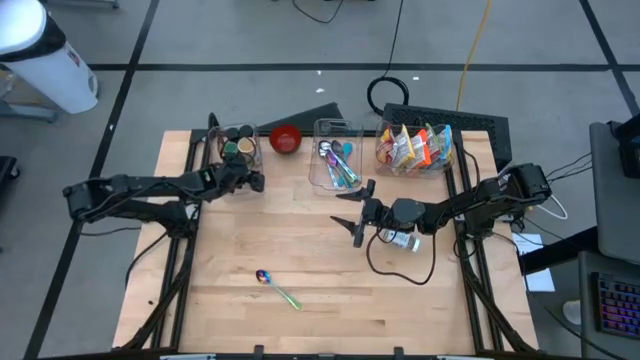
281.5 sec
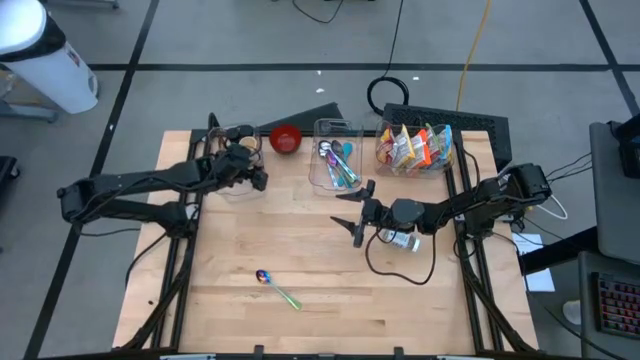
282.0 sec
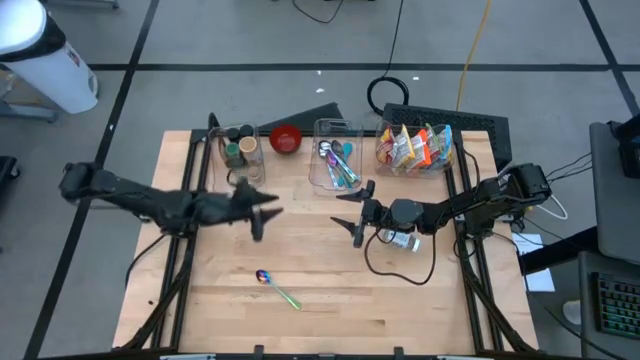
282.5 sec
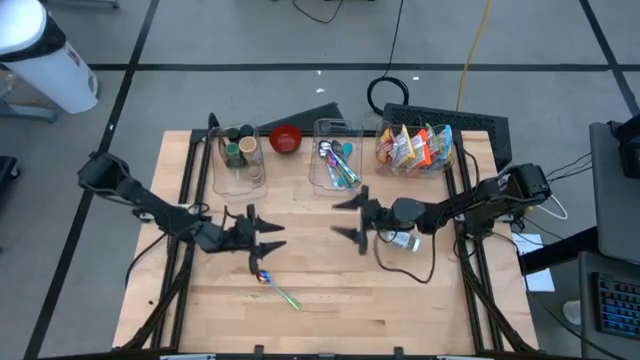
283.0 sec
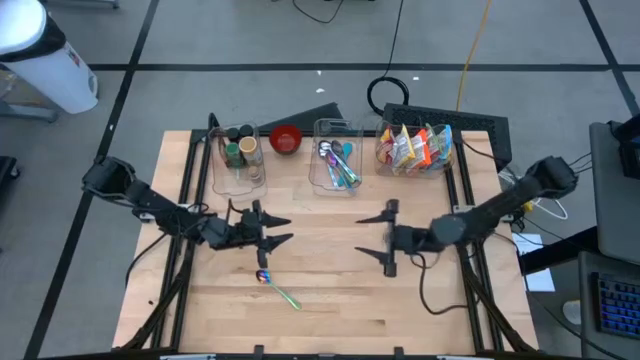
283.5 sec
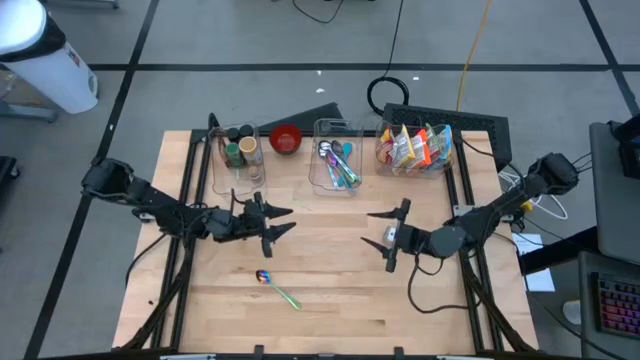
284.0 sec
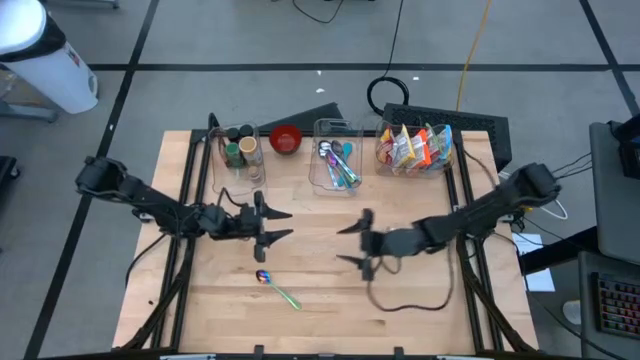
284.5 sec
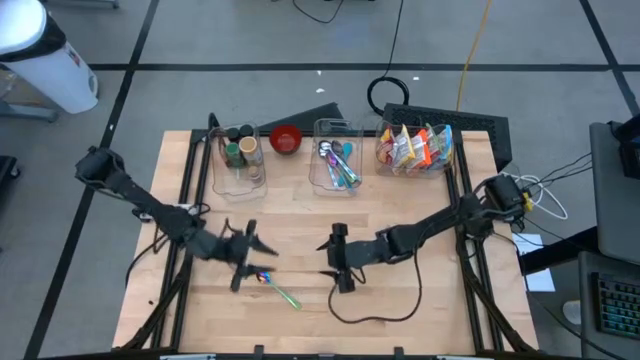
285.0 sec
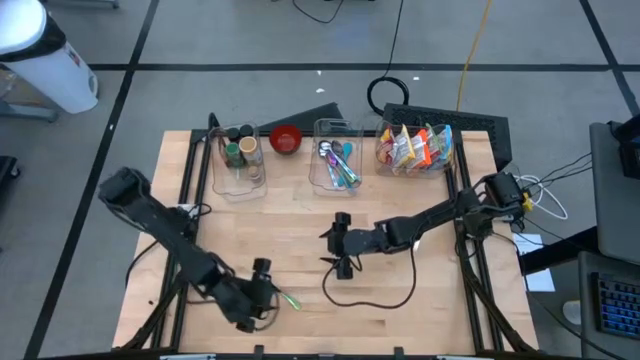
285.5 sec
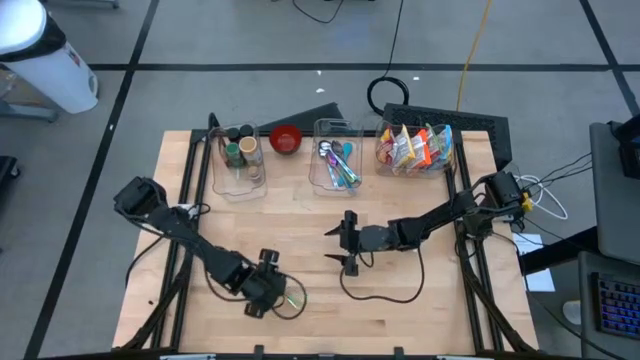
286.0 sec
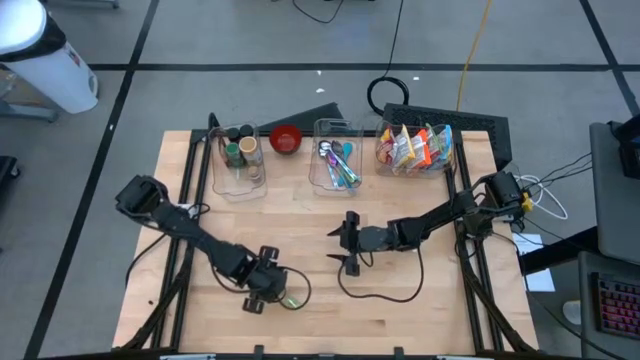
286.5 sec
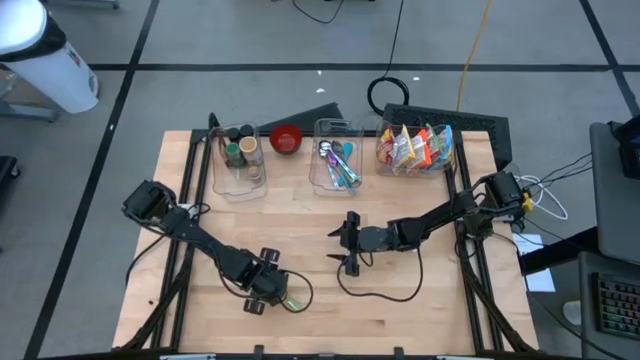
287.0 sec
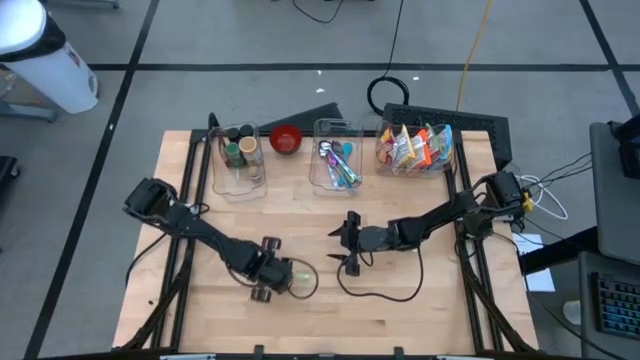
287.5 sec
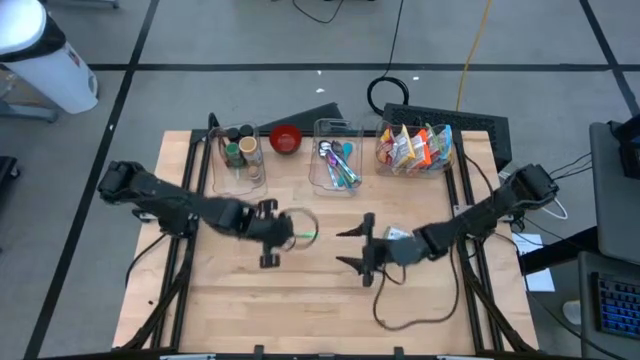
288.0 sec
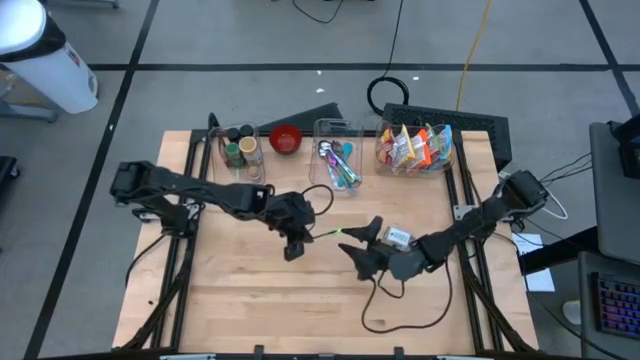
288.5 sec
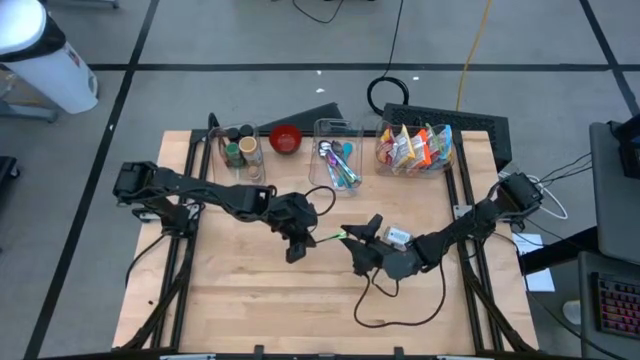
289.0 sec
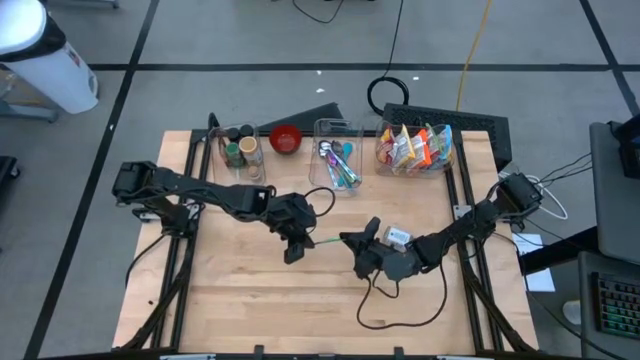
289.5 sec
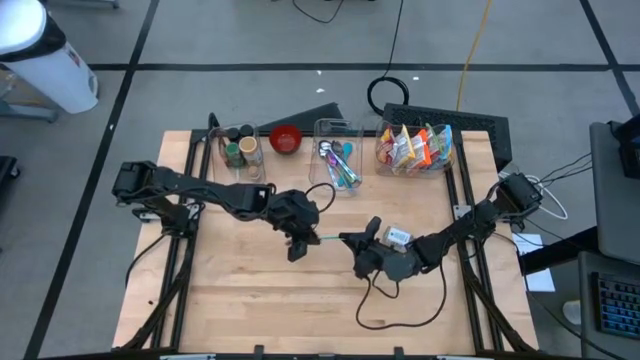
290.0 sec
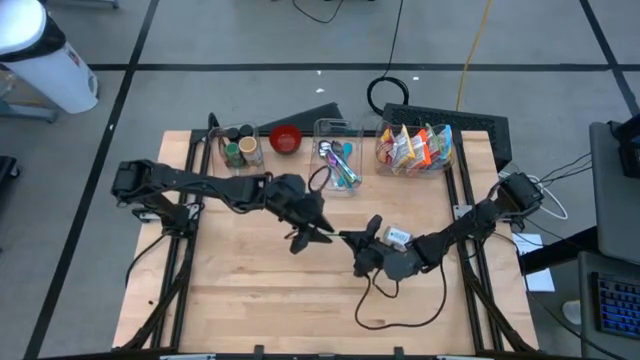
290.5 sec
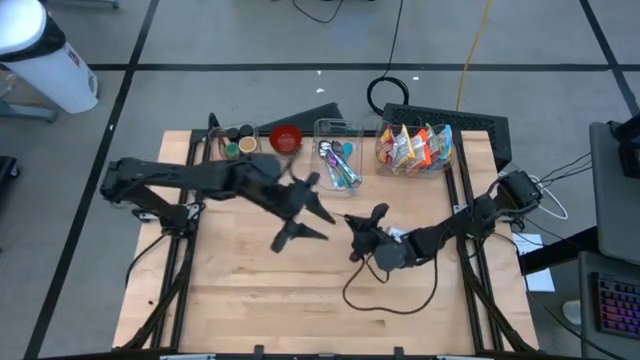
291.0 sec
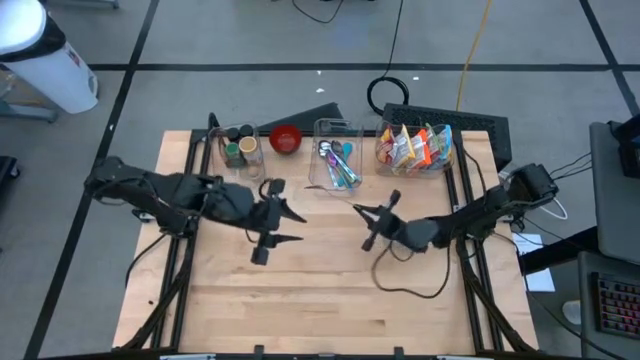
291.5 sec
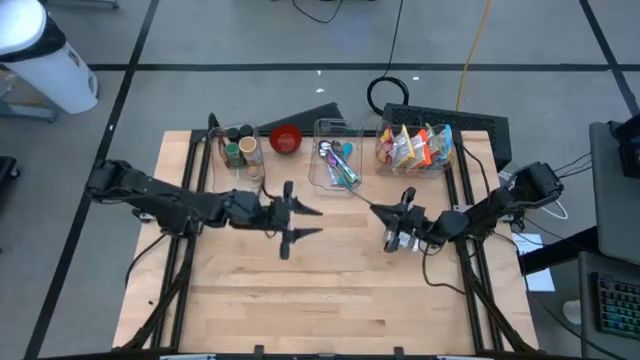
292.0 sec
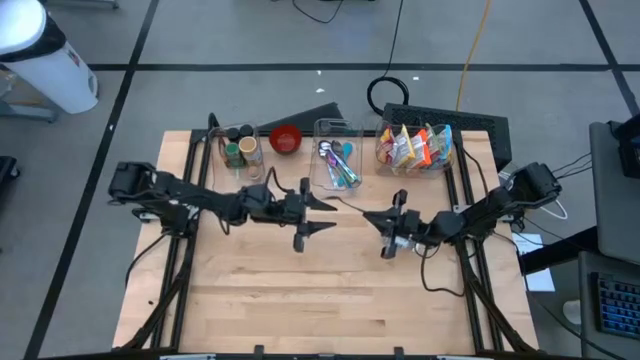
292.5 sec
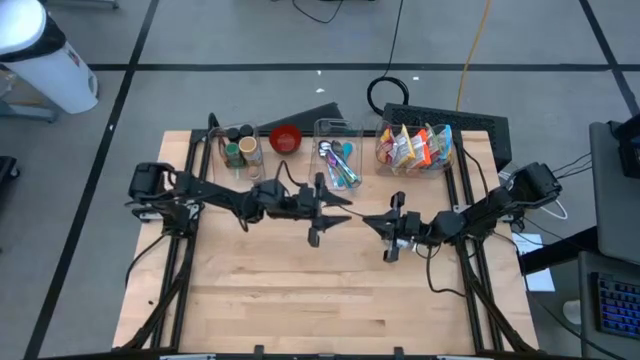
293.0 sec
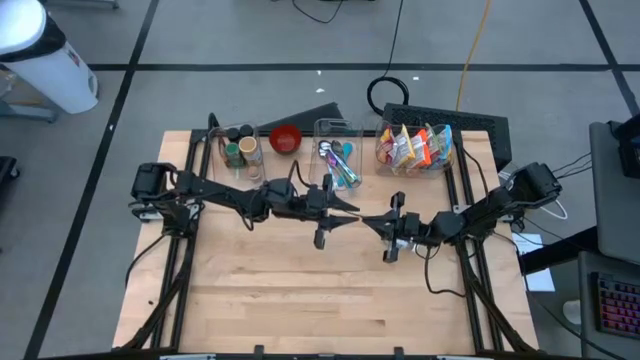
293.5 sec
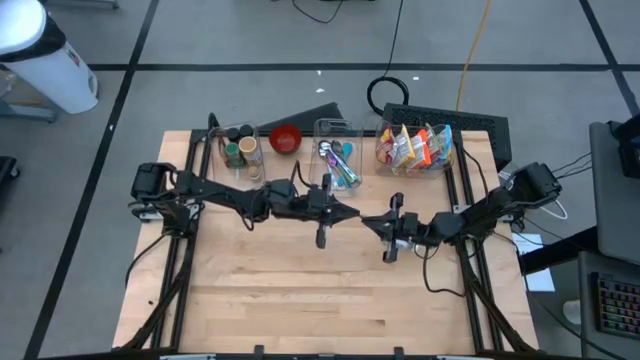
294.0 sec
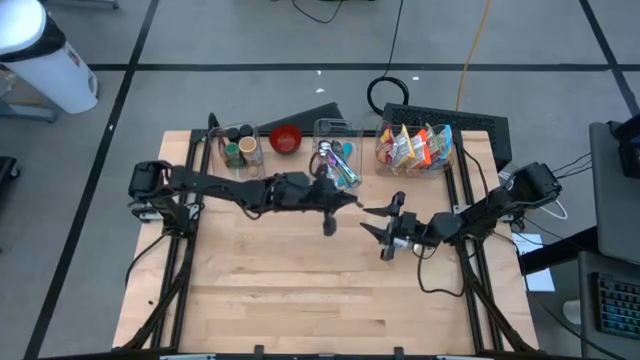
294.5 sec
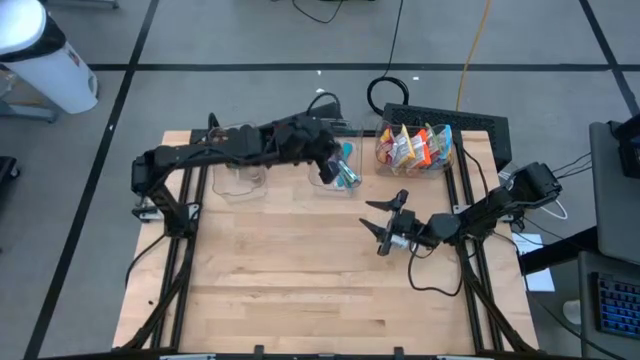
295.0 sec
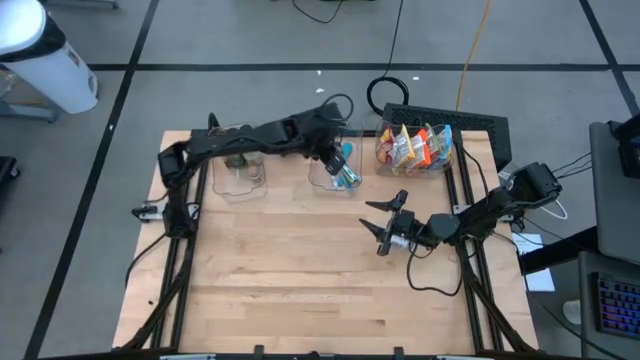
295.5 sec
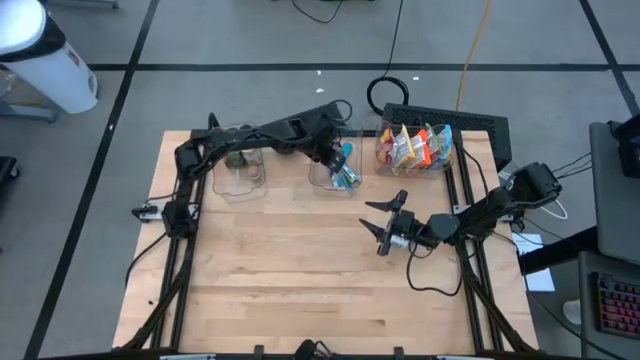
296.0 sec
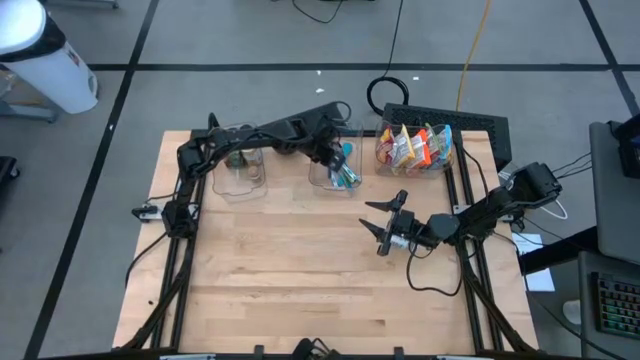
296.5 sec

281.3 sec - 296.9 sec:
Task: Pick & Place Food Item
Put the violet spoon into the middle transparent bin

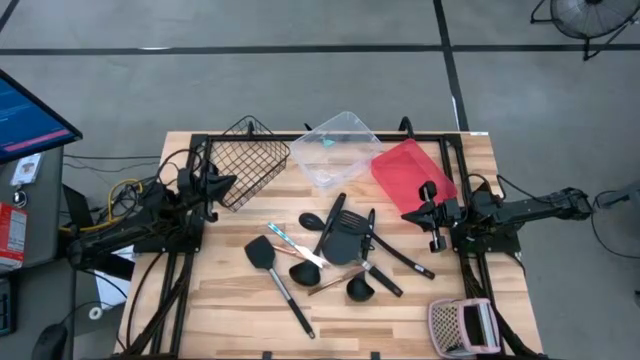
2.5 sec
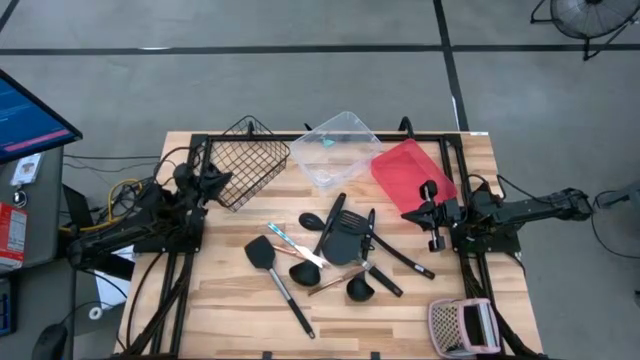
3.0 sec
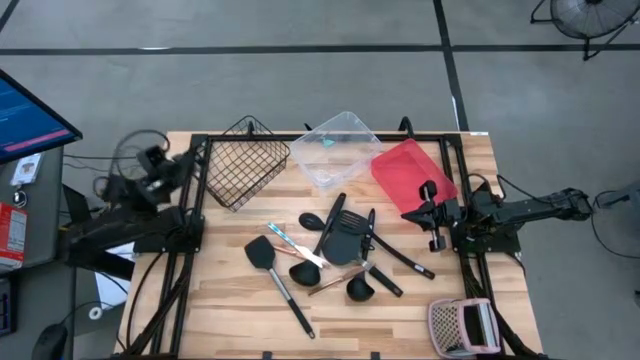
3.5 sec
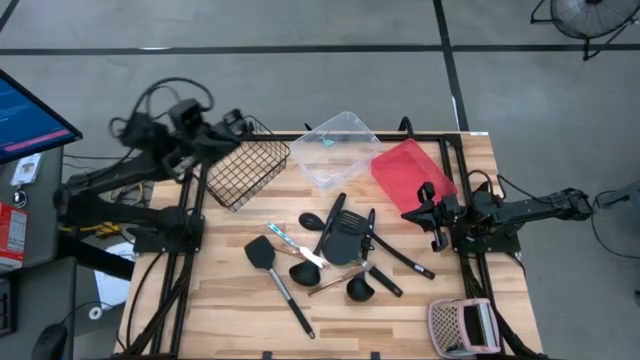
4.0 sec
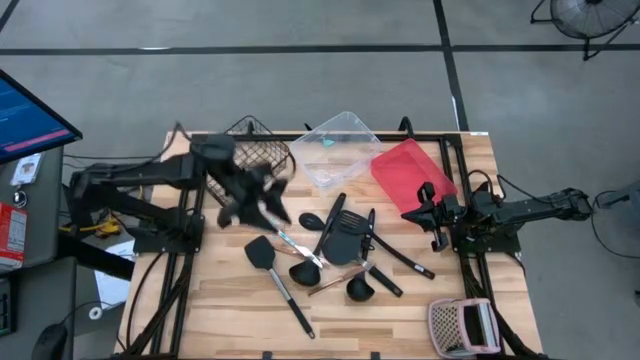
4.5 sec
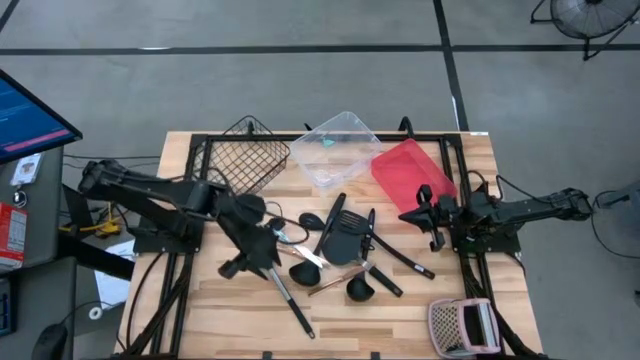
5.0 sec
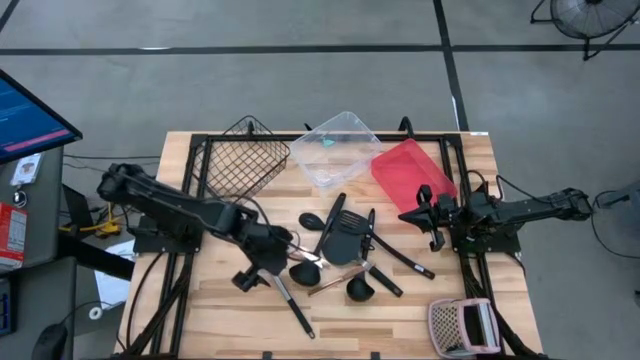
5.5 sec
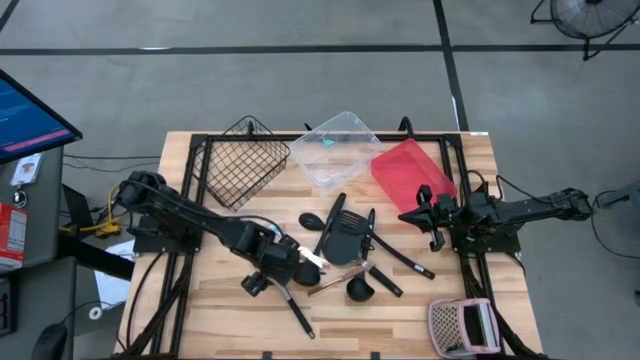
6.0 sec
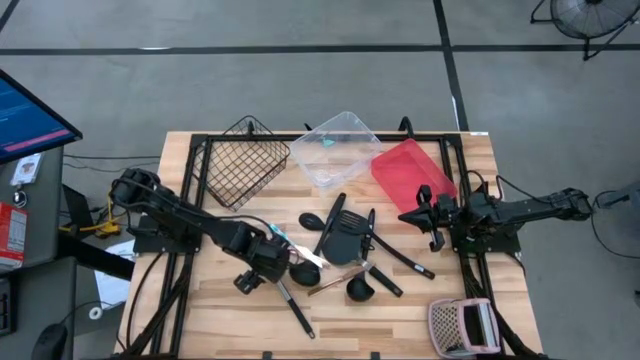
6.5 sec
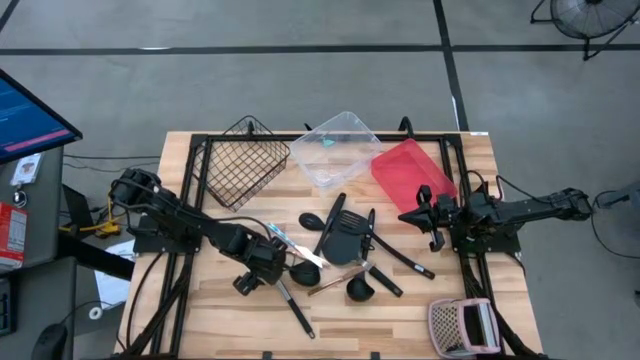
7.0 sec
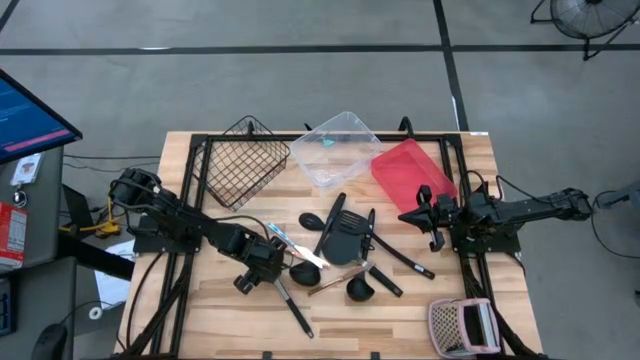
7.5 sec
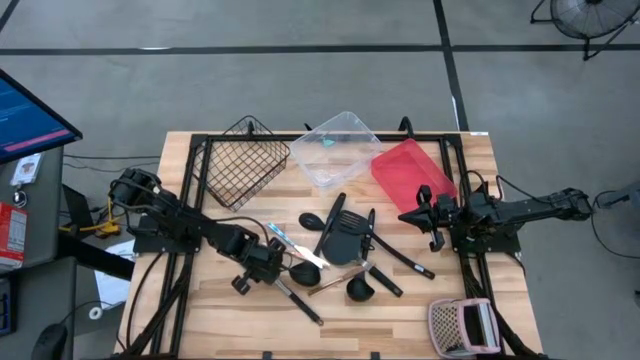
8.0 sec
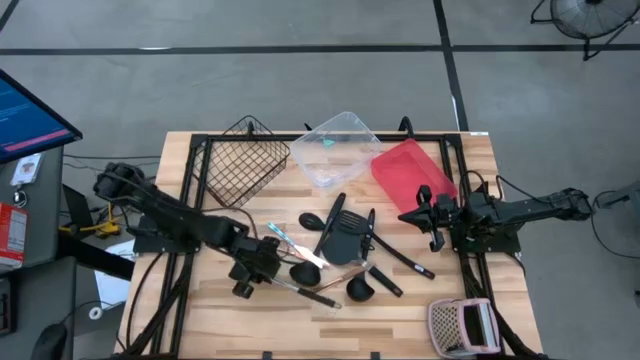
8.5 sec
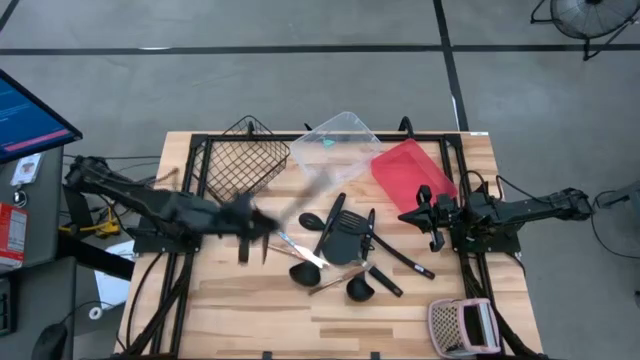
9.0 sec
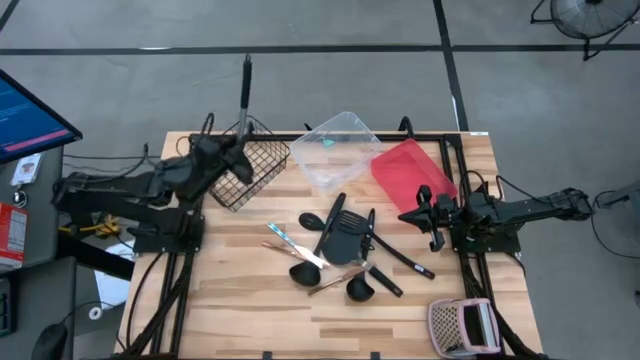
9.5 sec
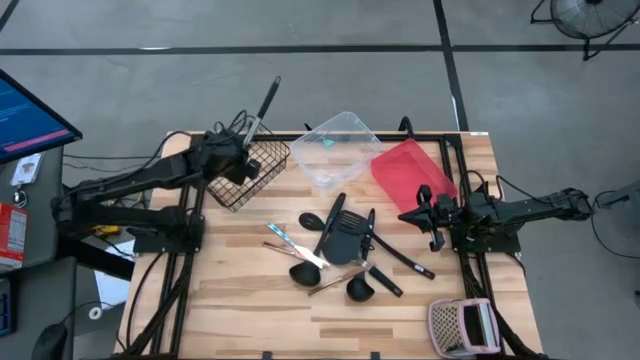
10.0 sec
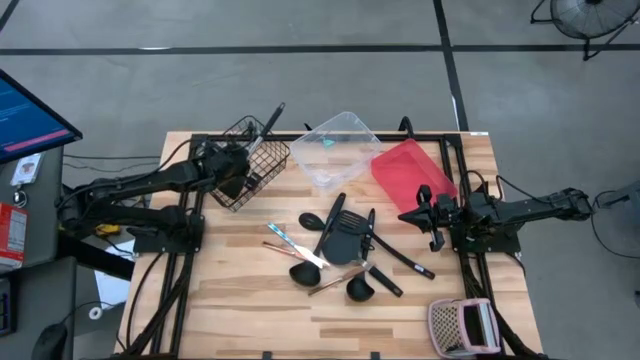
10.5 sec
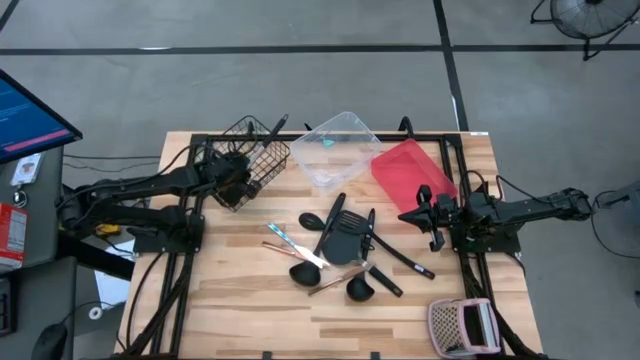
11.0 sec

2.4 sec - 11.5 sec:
Task: Pick & Place Kitchen Items
Put the bottom left spatula into the wire basket
